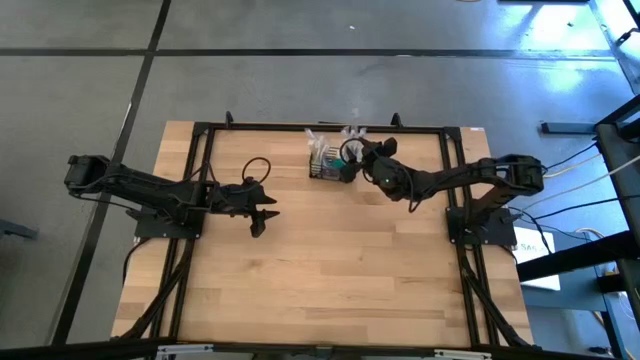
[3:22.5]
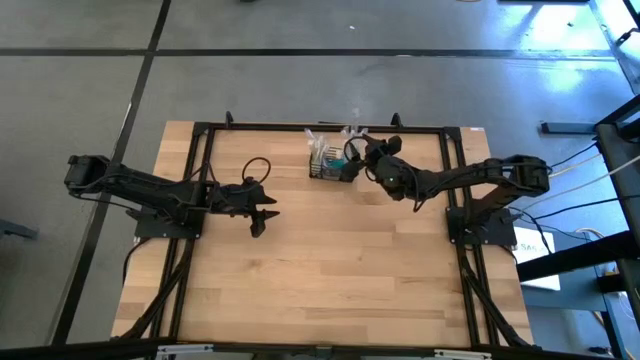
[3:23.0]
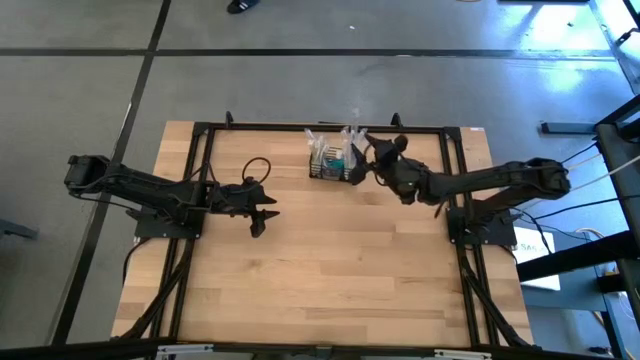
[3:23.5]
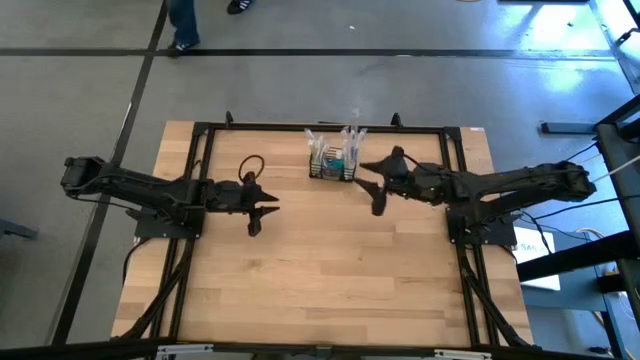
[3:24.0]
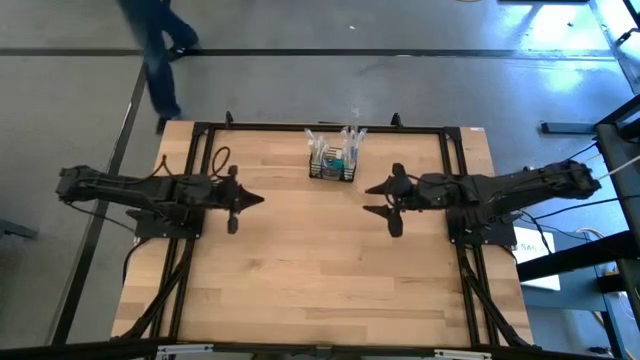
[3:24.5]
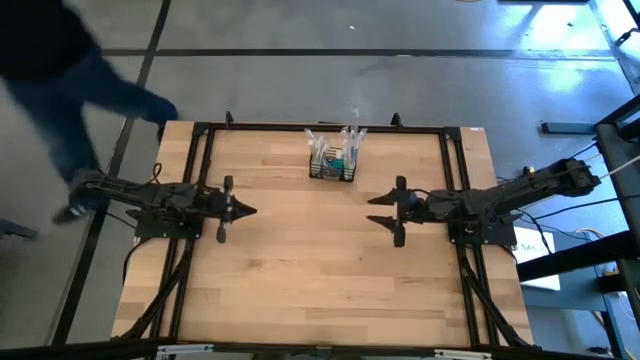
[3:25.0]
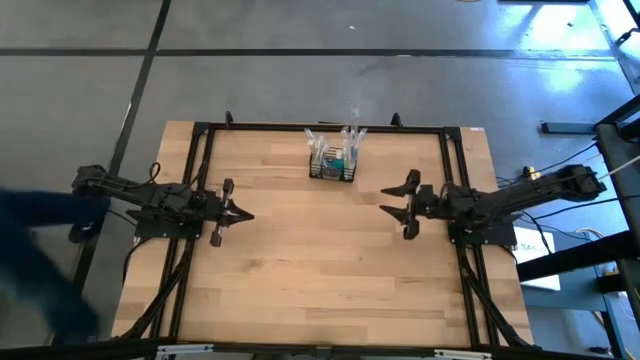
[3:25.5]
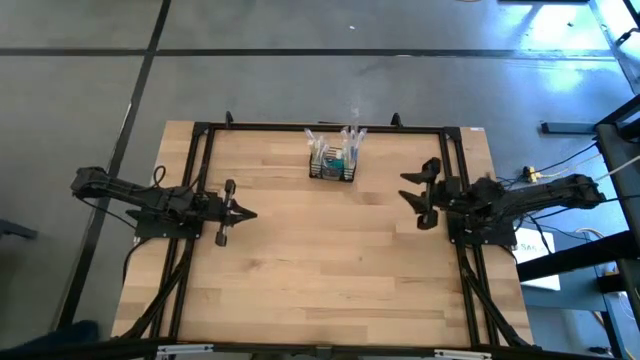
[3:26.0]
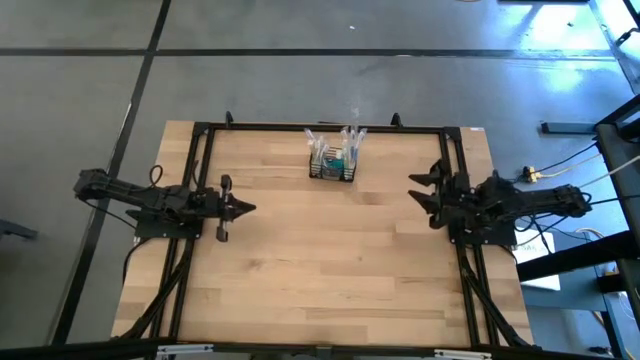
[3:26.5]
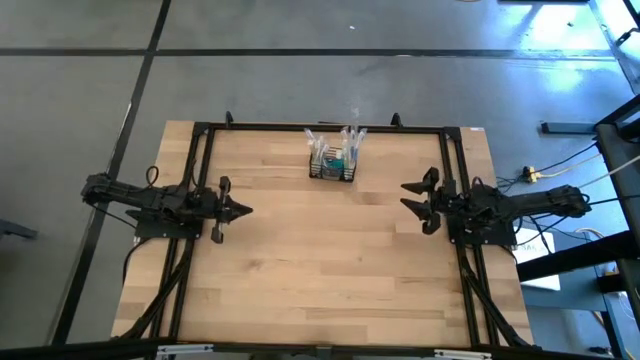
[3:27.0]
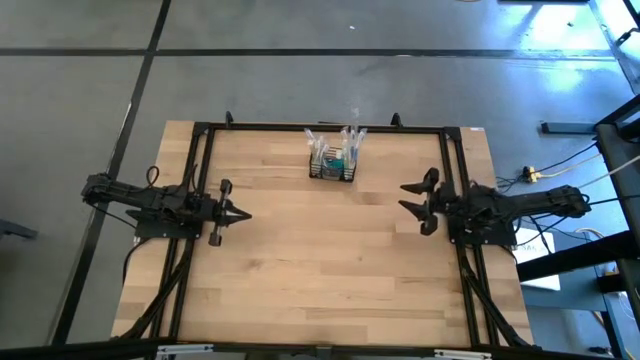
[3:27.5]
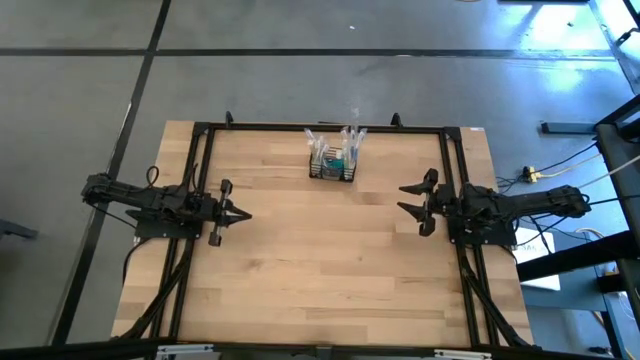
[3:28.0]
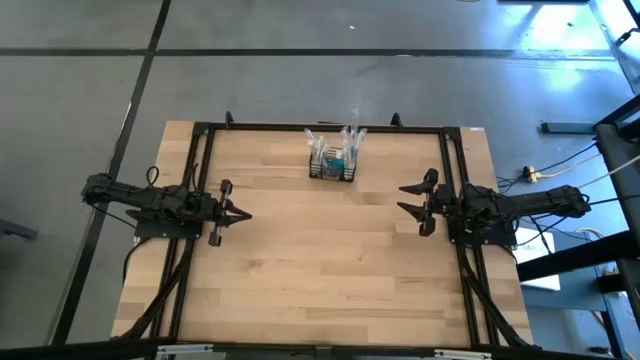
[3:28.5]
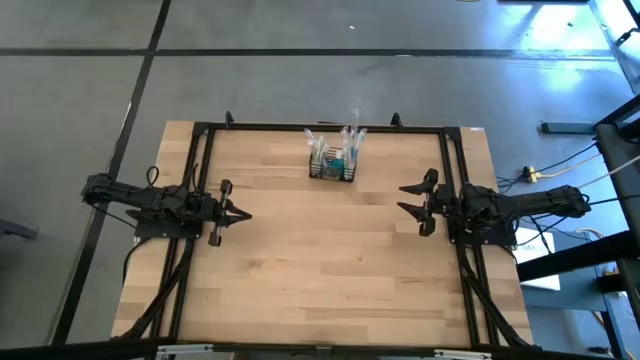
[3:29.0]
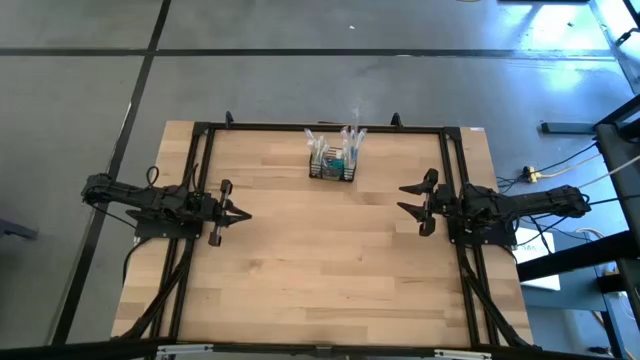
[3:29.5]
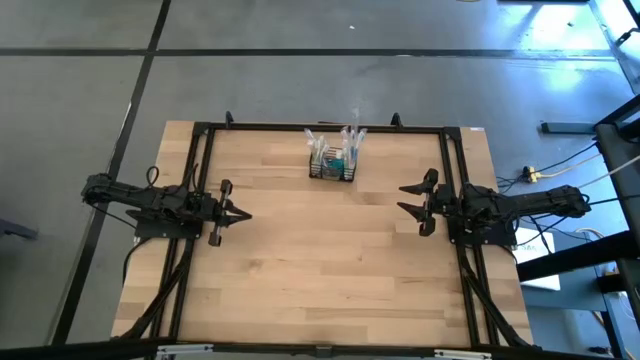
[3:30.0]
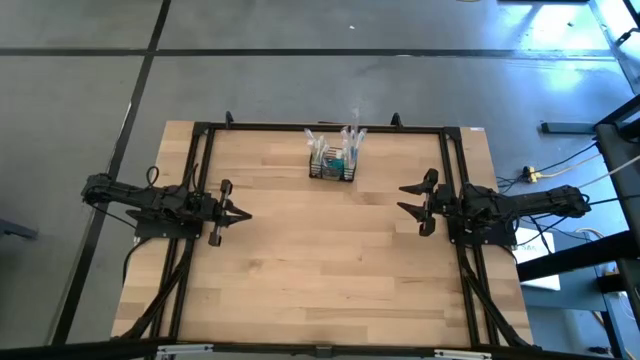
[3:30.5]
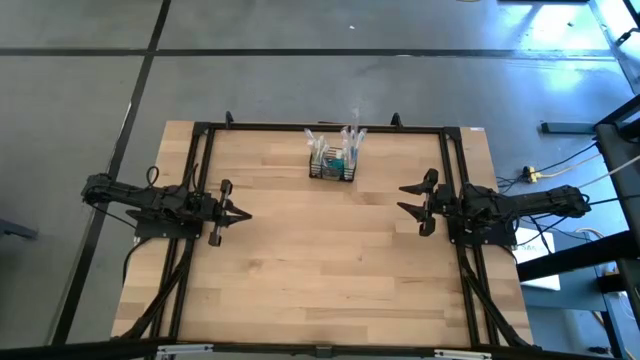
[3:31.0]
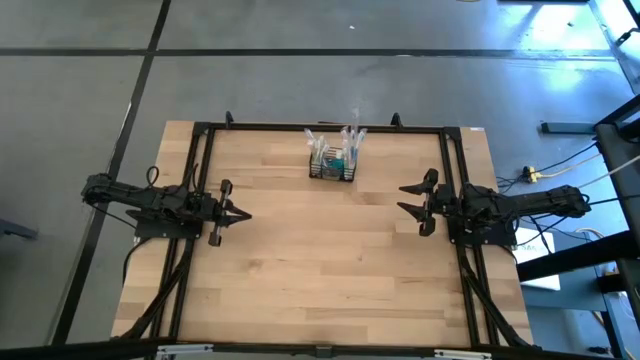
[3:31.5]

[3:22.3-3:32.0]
Task: Pick & Place toothbrushing station
Return to Home Position

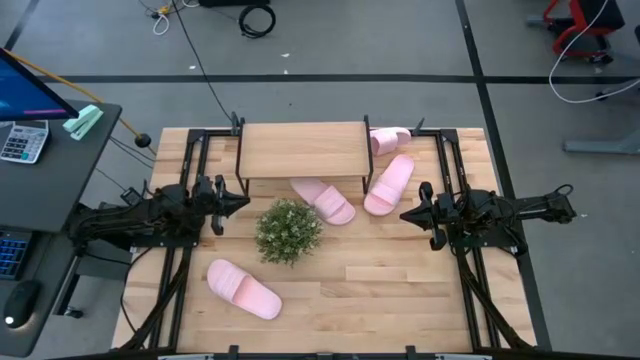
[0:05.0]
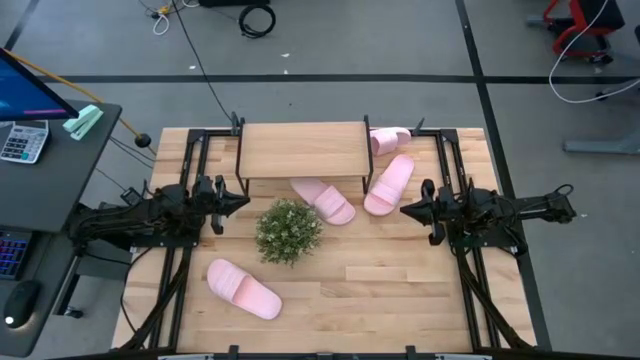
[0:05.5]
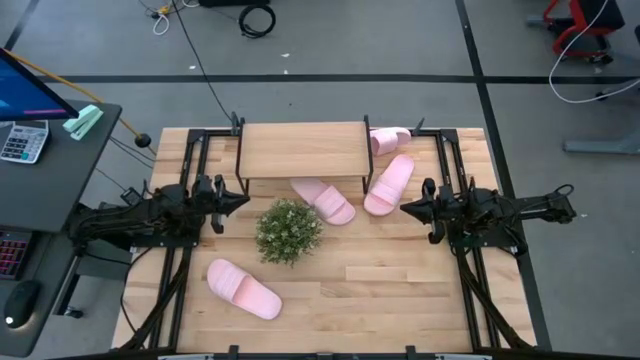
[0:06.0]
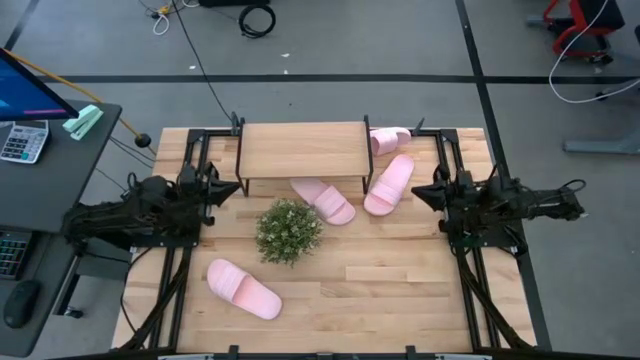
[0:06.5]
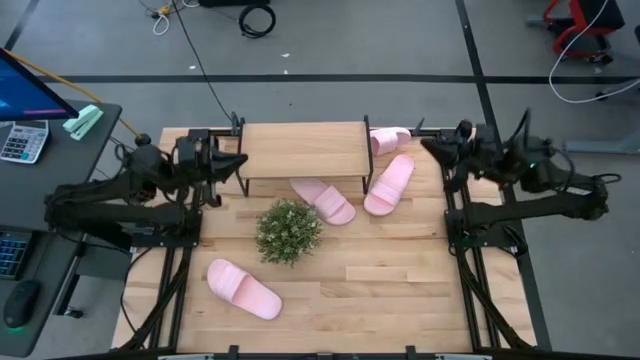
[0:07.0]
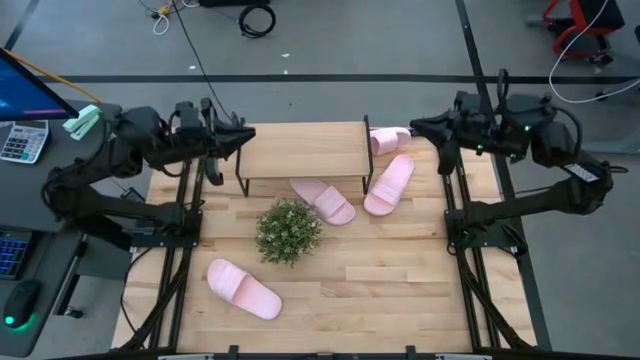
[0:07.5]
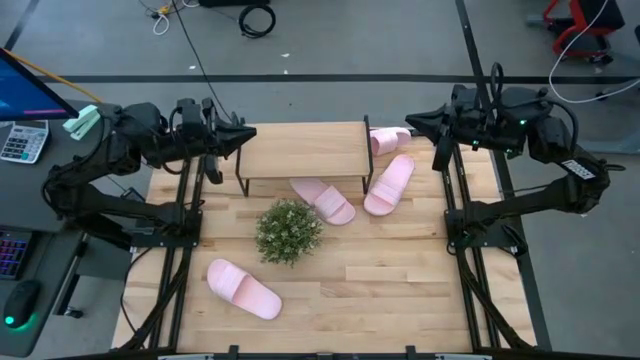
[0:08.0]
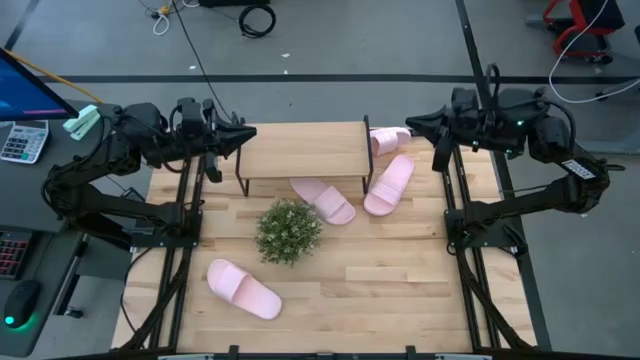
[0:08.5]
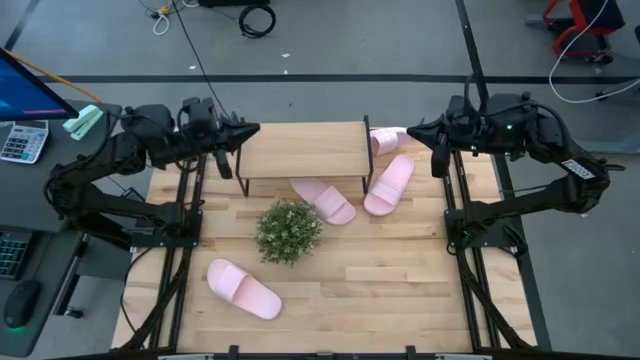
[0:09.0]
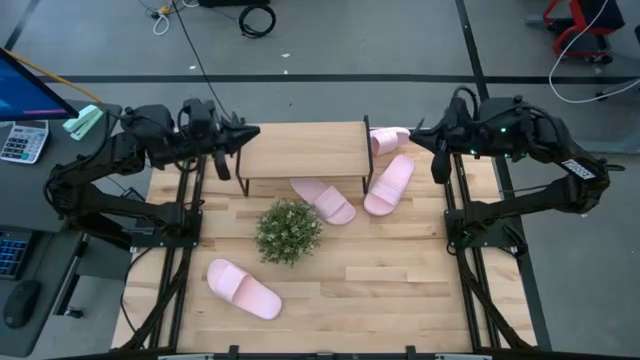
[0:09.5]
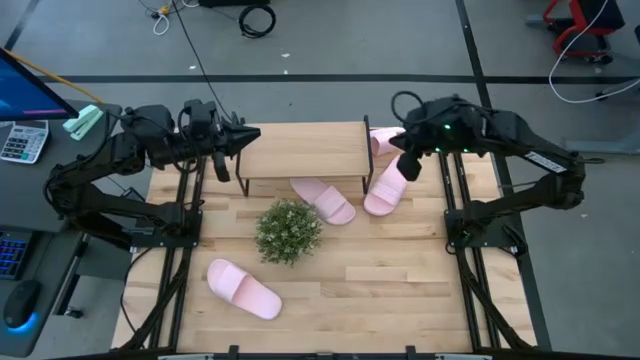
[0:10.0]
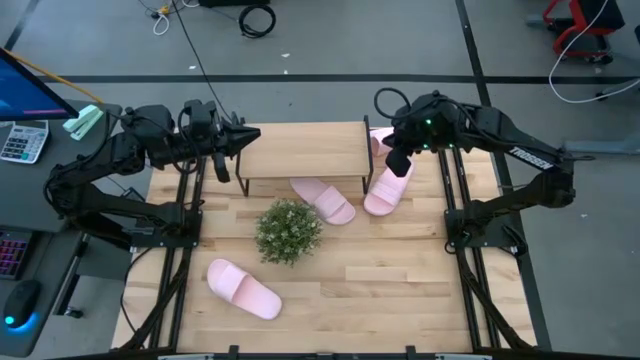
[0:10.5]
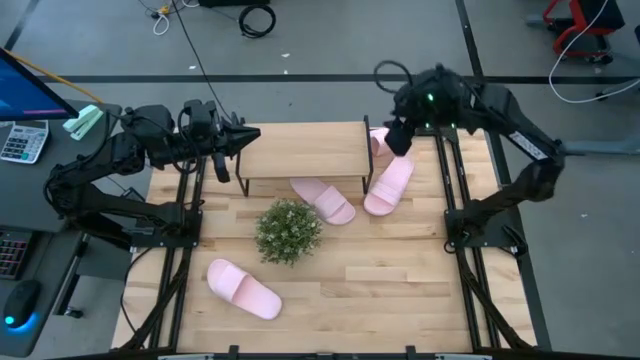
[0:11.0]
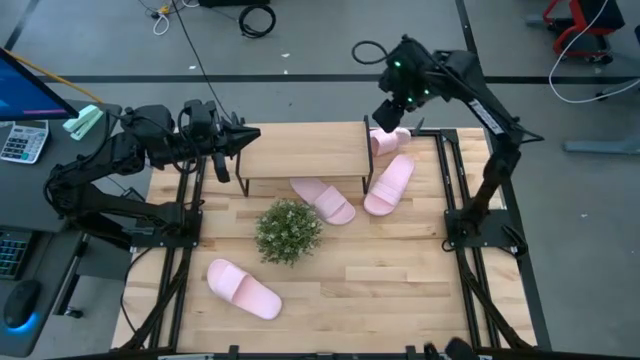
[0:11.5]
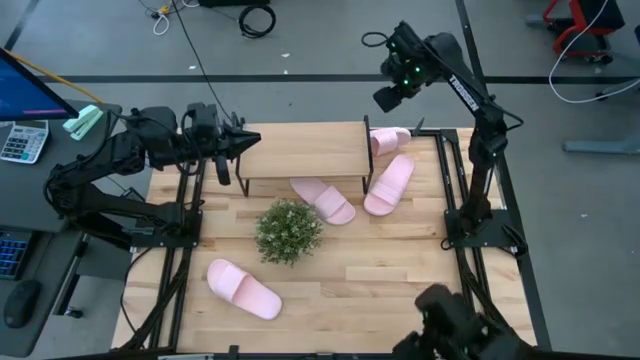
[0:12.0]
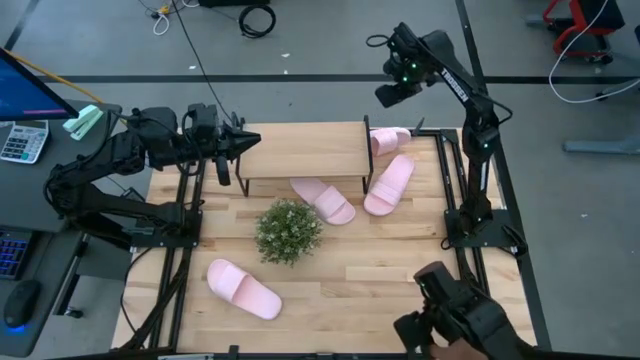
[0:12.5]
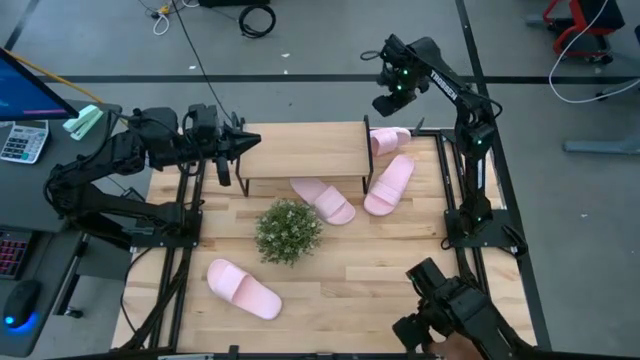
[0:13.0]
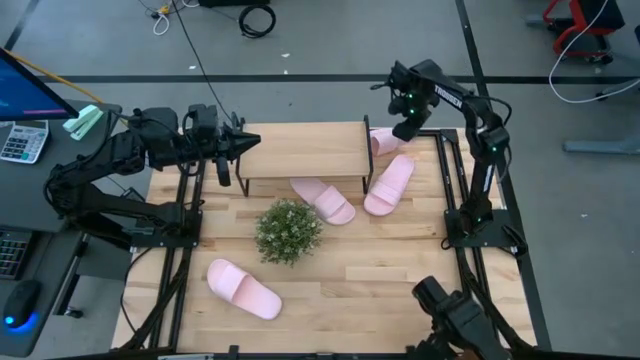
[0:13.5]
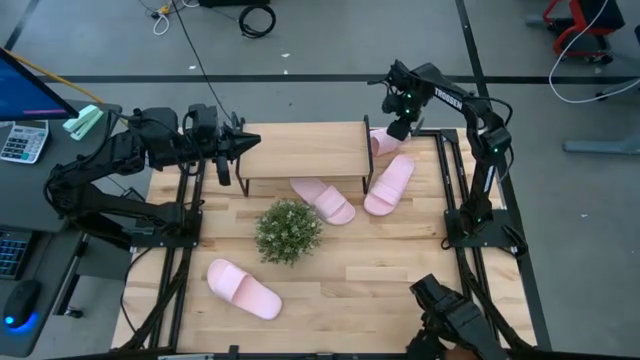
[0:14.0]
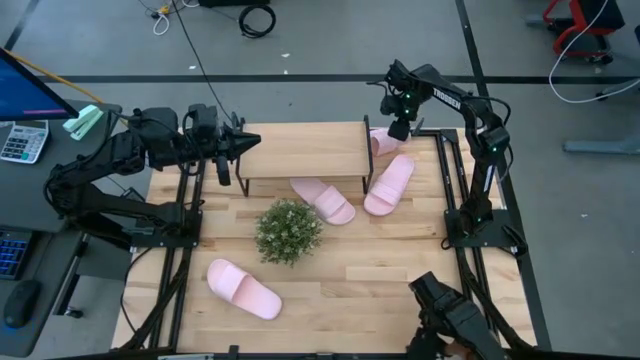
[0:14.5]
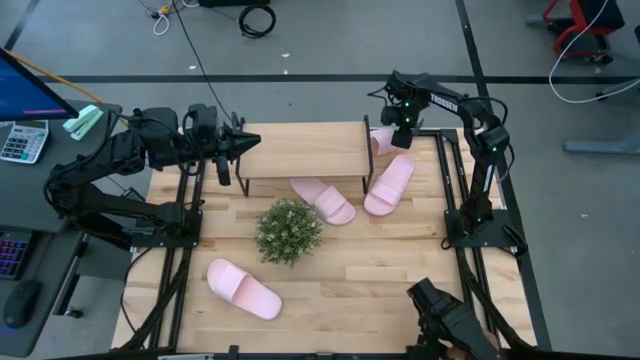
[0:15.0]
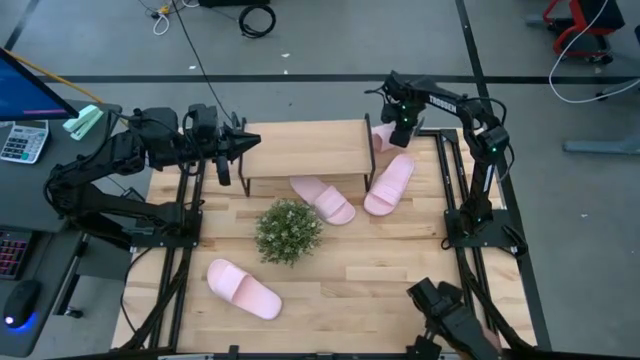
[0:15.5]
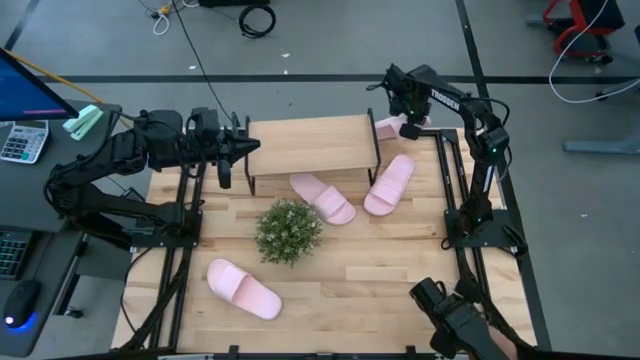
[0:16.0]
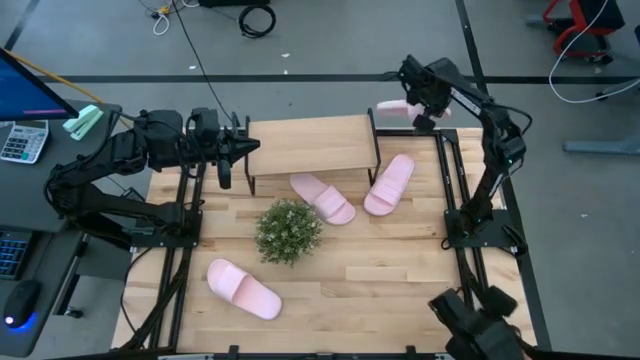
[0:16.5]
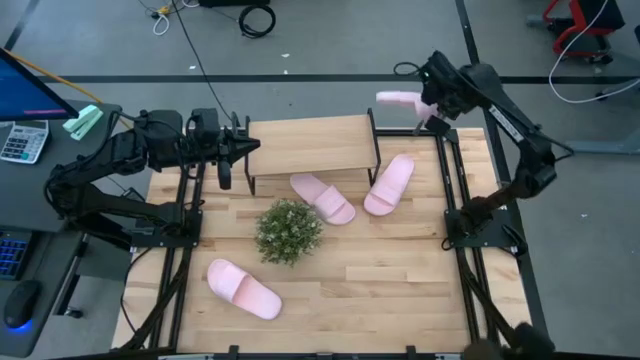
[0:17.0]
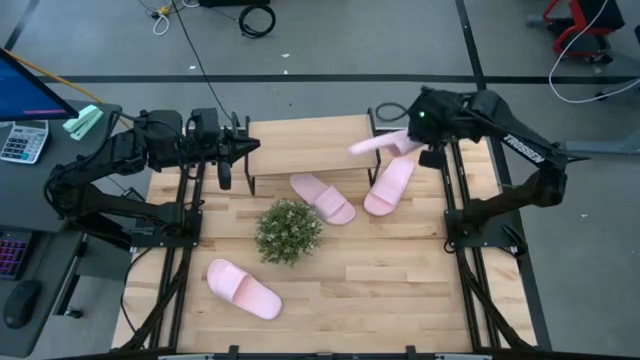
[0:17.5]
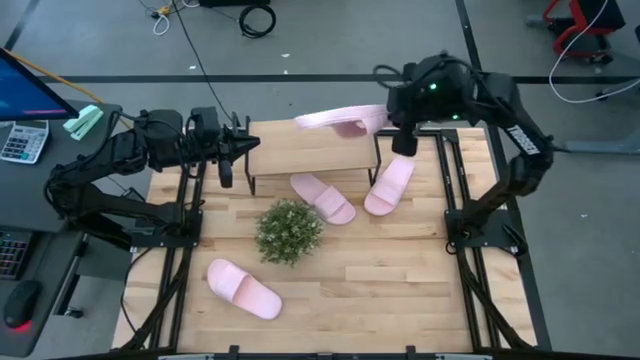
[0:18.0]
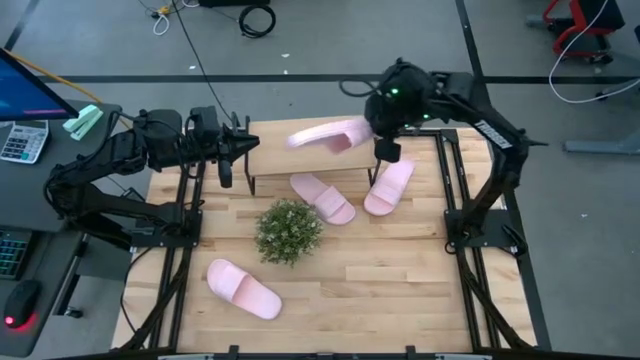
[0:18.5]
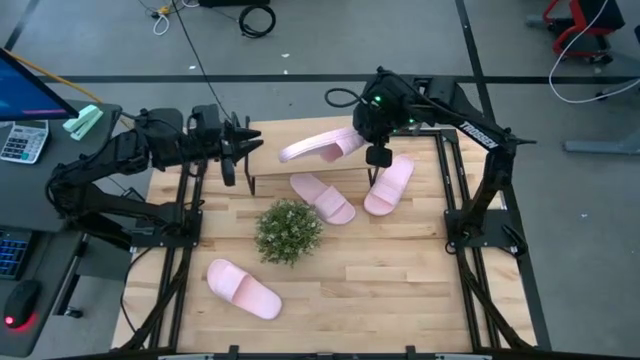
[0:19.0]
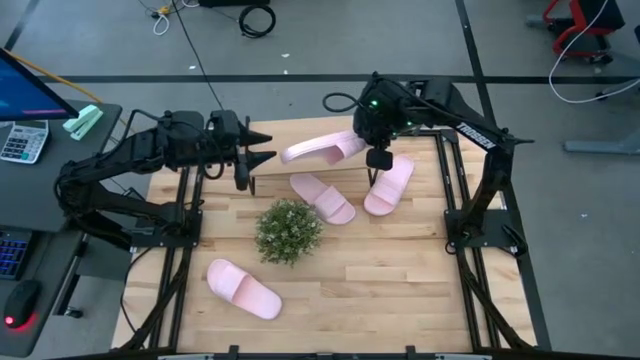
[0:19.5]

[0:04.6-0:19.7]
Task: Pick and place slides into the shelf
Put the pink slide on the shelf
